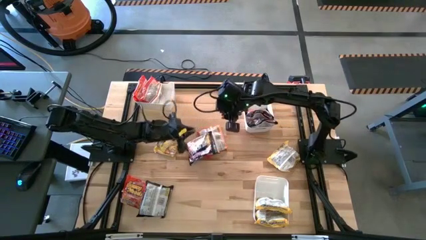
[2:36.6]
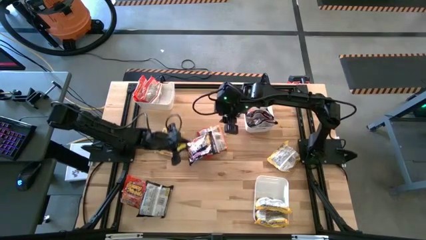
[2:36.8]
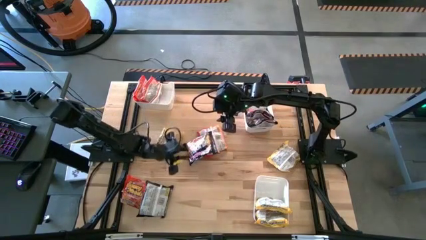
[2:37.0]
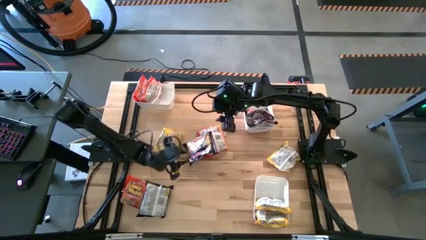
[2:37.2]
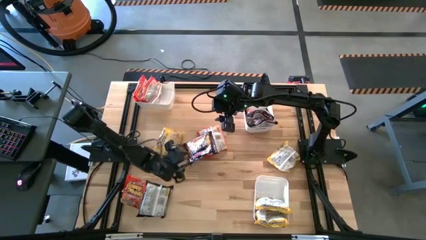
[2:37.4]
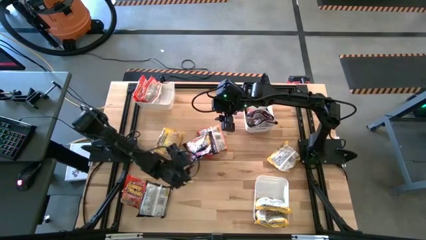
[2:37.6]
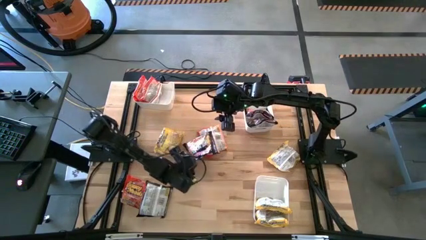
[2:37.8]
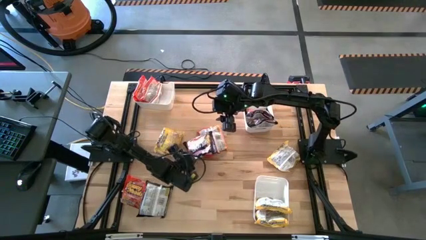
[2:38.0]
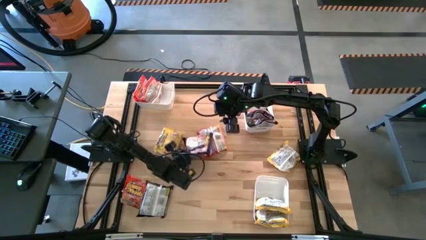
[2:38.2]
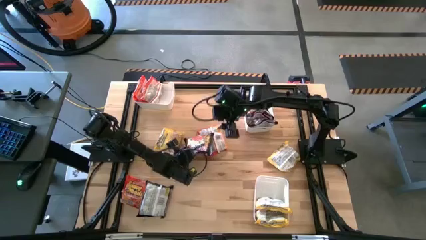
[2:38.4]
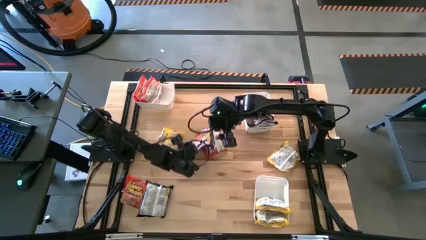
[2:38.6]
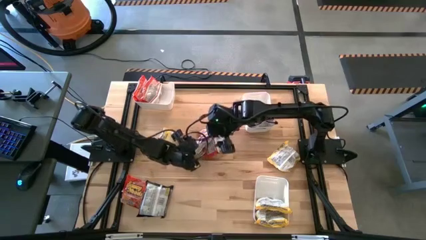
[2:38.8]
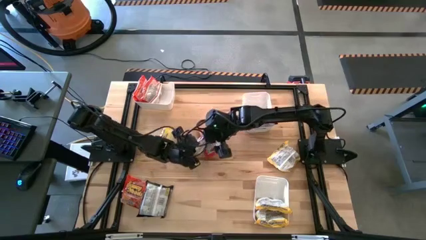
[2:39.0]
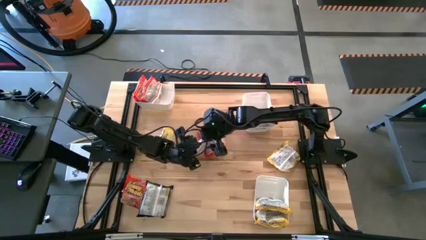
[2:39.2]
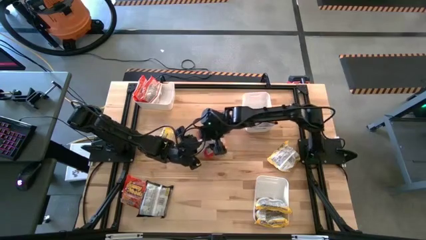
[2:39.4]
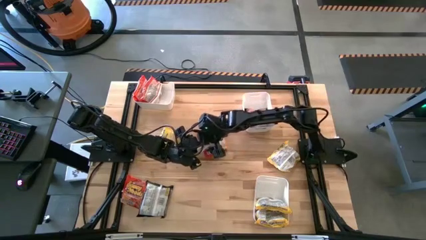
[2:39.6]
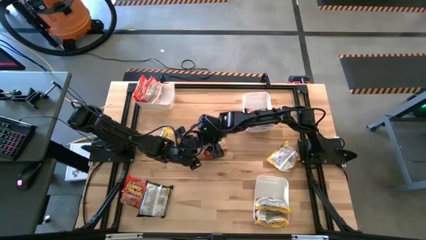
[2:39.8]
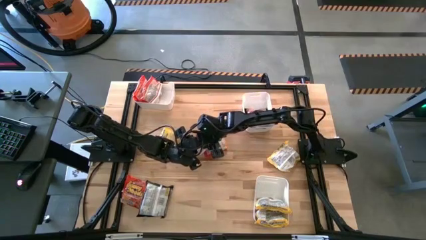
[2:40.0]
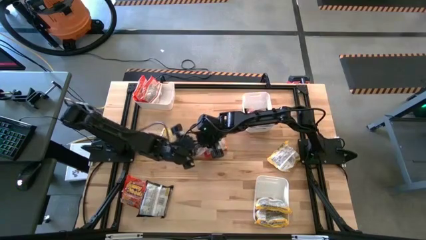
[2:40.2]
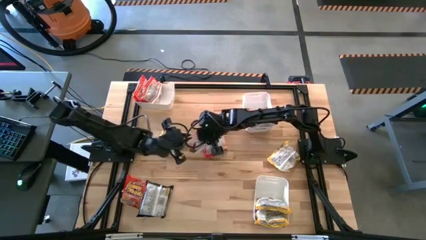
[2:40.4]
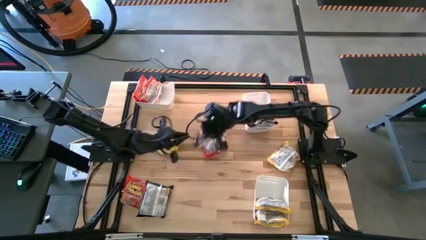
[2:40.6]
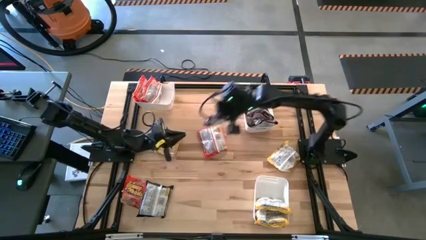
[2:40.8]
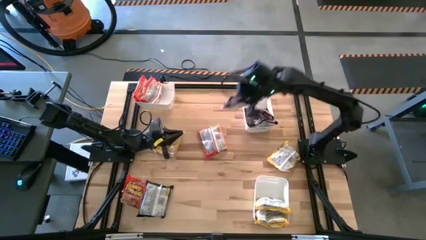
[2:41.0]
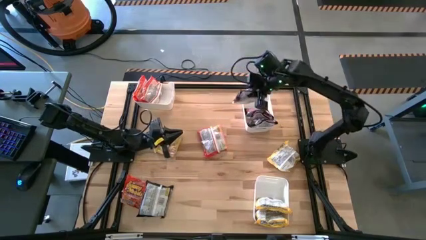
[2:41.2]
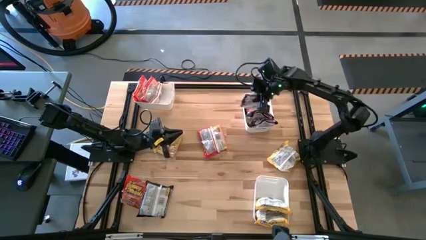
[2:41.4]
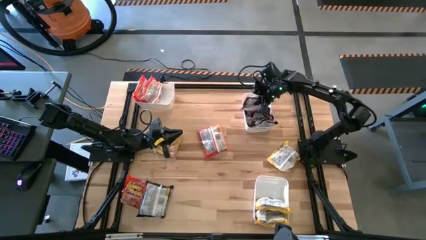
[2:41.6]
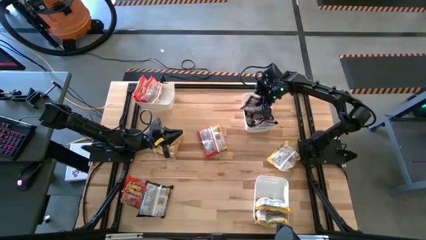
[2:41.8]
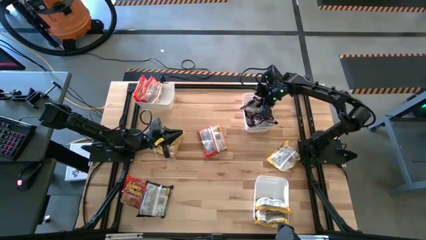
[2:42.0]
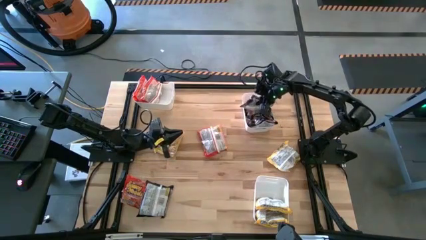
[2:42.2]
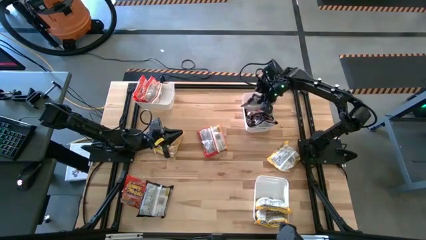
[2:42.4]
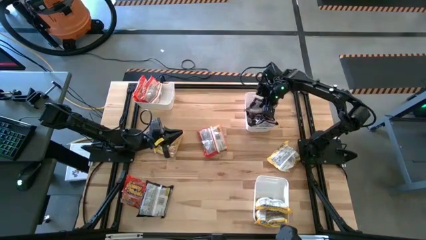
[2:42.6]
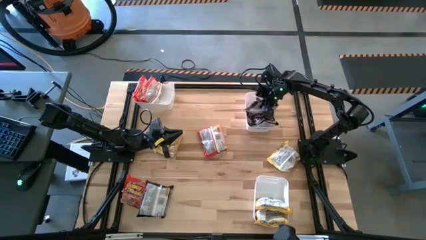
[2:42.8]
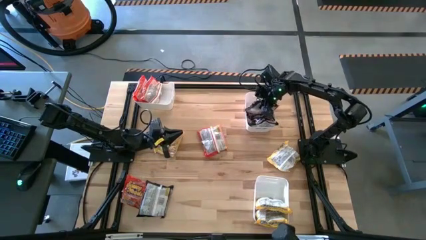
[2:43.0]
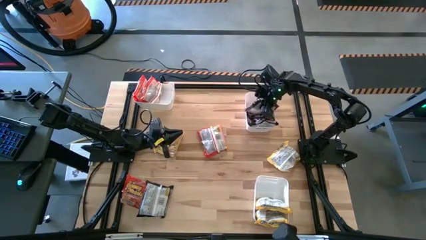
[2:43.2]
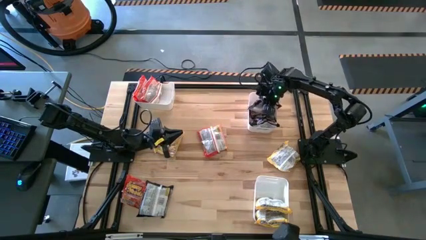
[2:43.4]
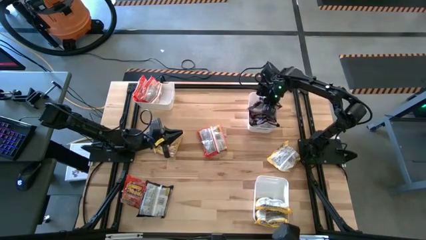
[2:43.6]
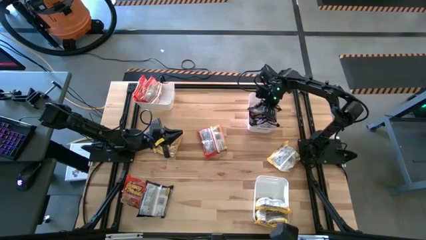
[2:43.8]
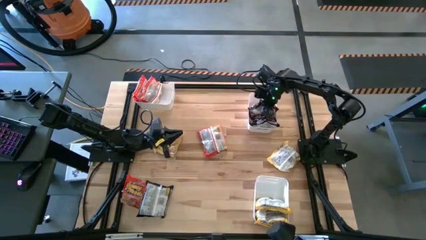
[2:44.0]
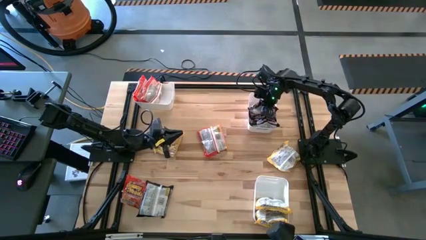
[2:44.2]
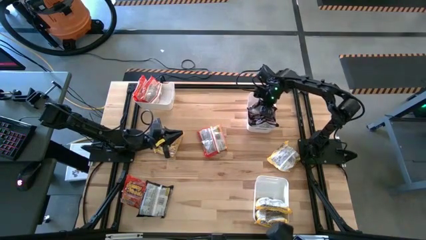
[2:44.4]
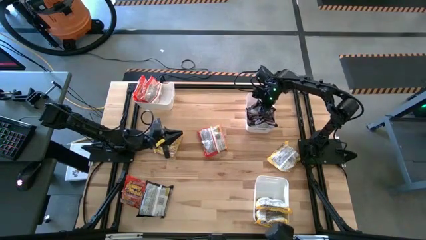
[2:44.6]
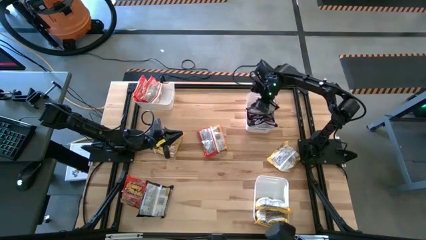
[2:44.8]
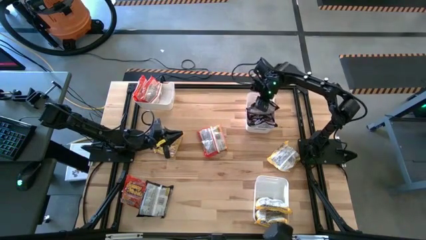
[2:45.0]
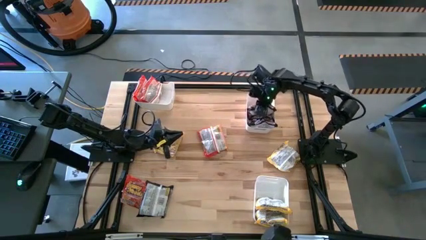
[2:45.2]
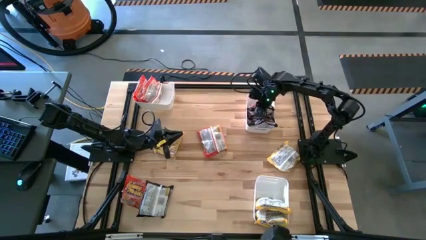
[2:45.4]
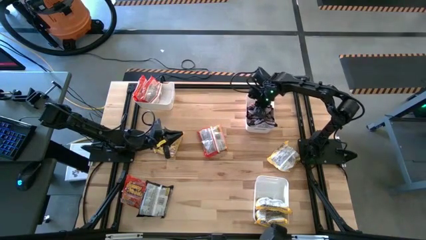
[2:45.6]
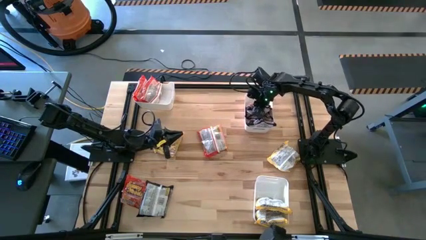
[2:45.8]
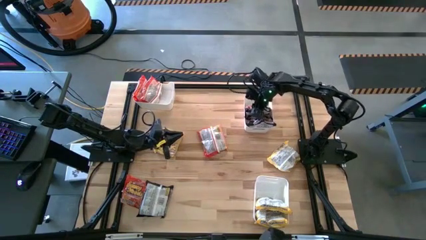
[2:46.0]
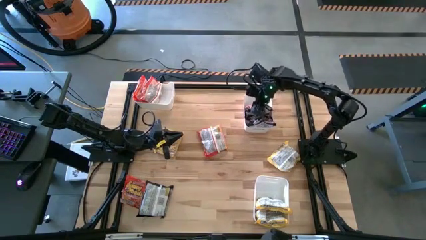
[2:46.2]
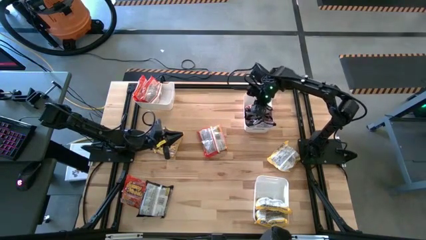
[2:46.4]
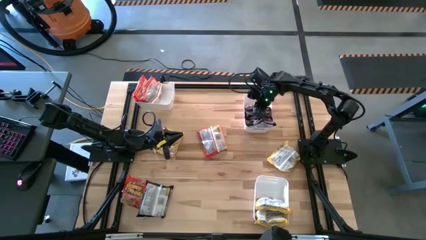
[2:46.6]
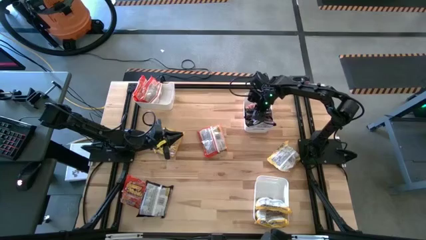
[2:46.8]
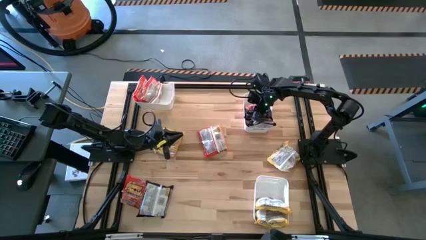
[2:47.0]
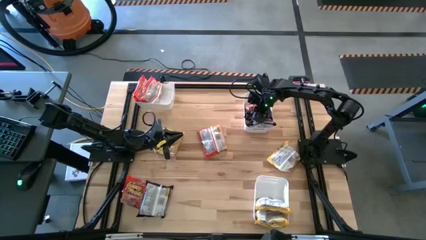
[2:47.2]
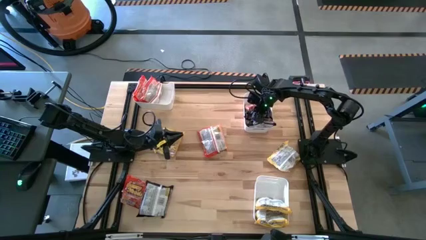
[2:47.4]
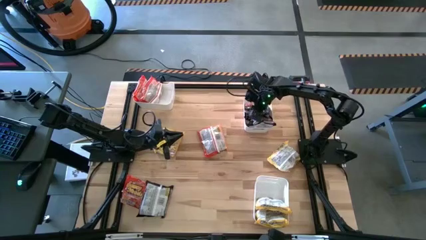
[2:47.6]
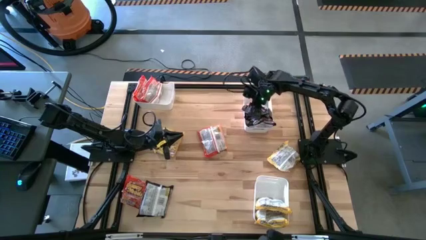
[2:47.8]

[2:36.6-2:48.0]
Task: Sort Maruchan noodles
Put the black noodle pack into the top right white bin

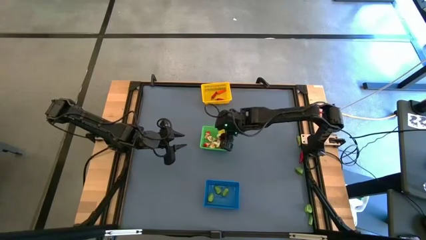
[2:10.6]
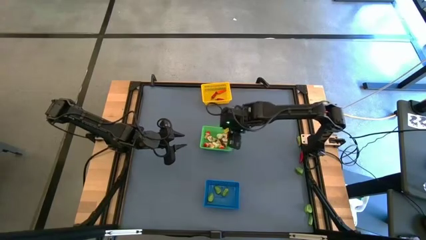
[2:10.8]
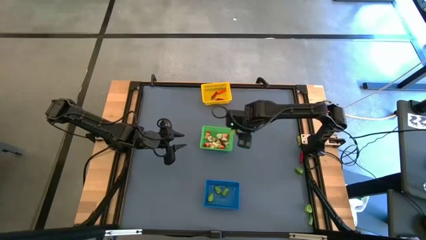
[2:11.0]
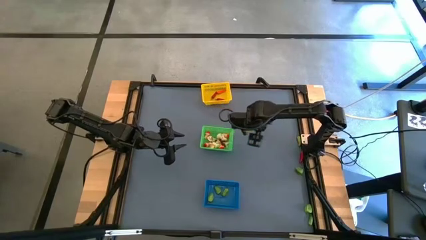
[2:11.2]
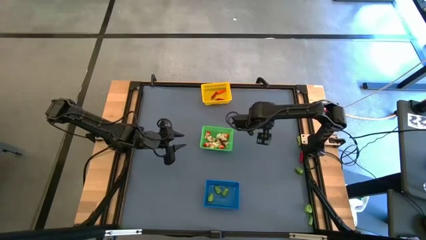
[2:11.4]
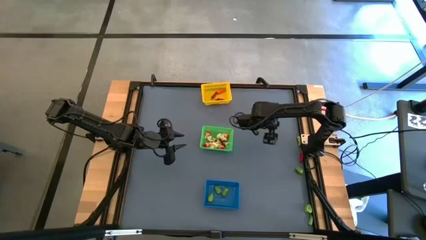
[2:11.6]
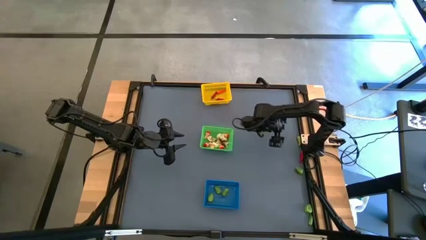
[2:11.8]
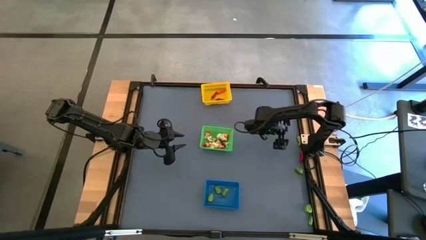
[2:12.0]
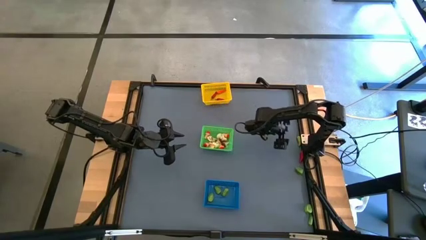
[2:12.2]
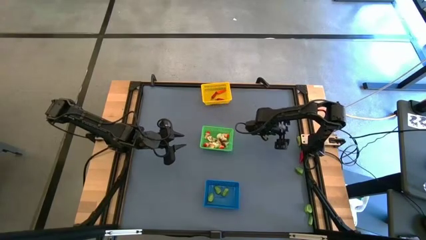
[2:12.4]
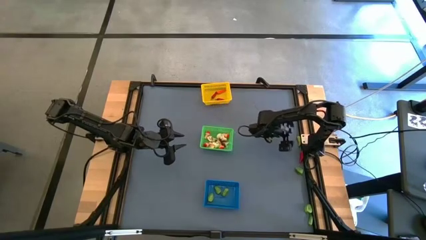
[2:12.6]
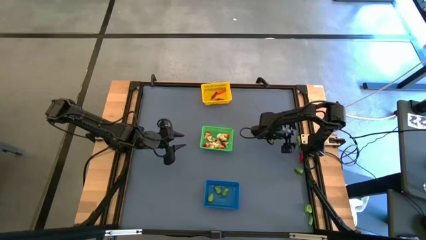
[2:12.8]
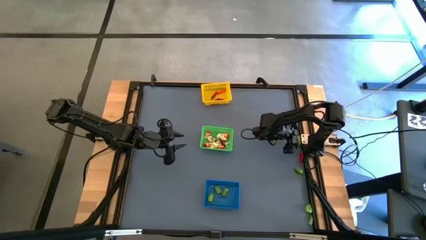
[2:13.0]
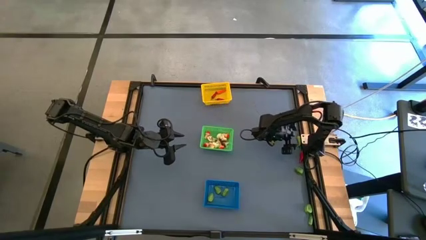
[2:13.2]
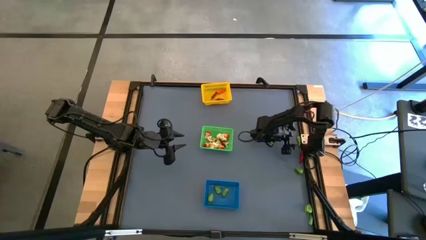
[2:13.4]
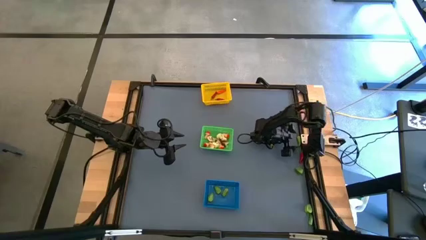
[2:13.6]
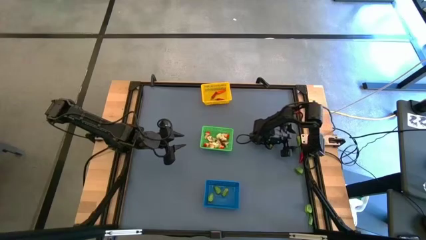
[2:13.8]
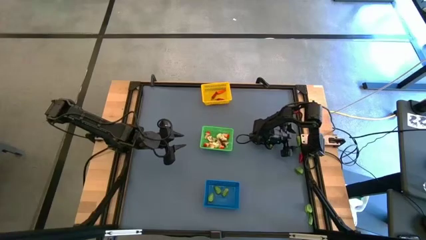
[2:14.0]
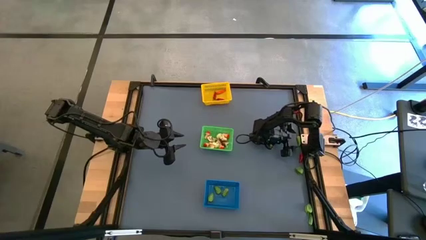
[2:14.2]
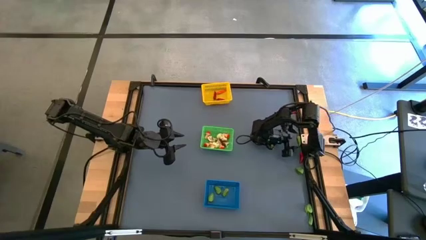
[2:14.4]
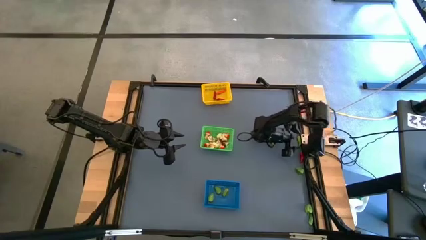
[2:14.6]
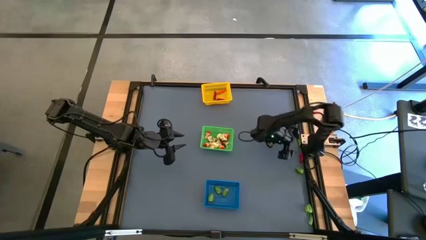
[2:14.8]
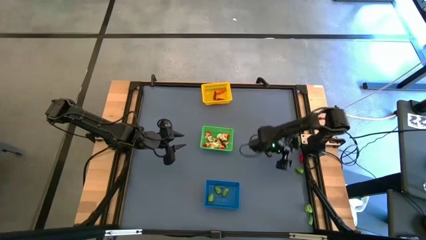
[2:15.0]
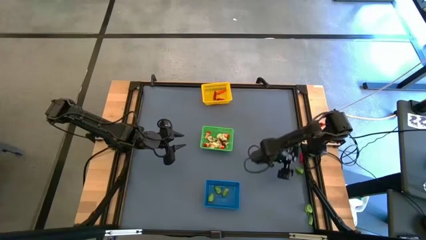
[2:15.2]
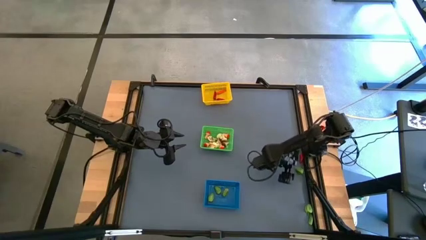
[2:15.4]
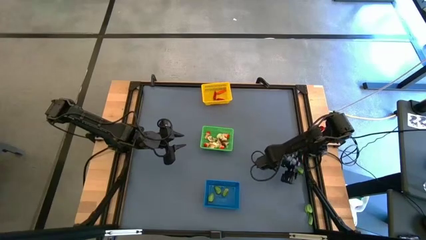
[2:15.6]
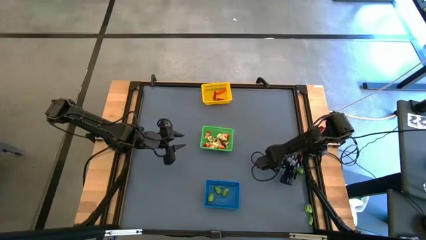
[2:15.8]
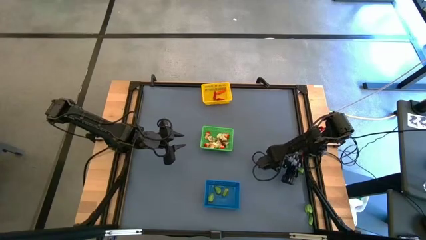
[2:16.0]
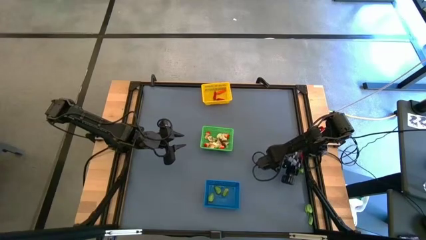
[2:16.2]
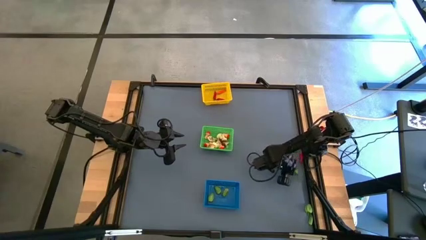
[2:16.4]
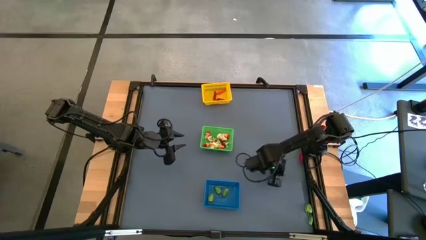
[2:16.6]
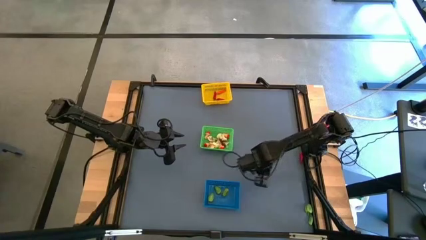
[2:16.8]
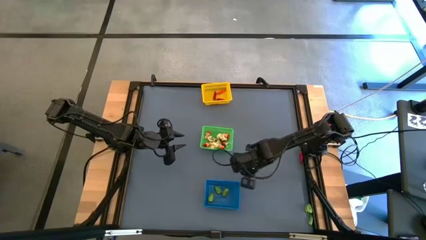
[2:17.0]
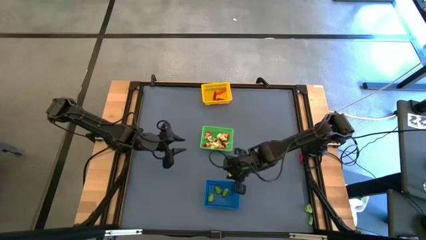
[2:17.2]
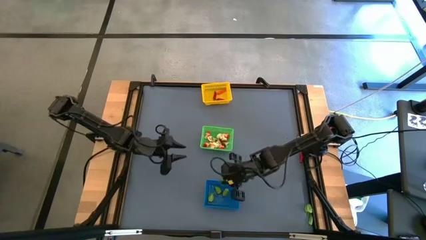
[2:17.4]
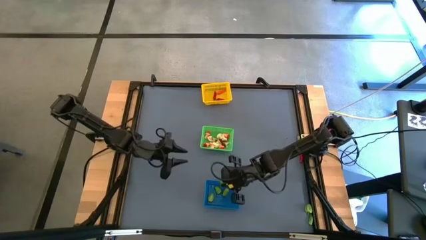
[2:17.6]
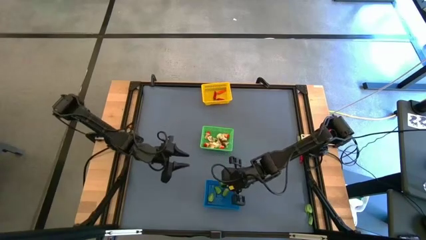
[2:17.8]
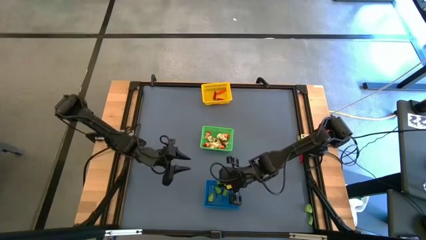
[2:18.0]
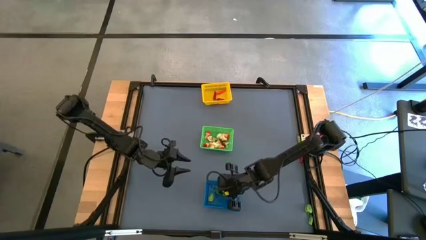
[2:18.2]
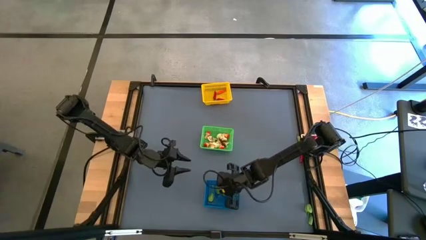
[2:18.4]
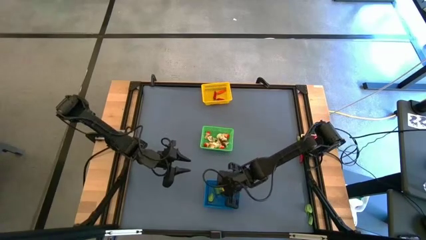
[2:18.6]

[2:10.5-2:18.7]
Task: Sort produce into baskets
Put the green chili pepper into the blue bin
